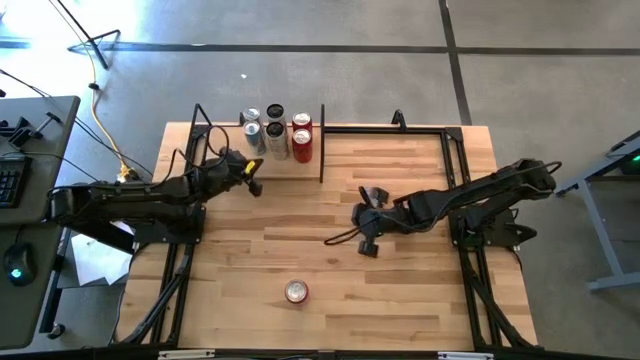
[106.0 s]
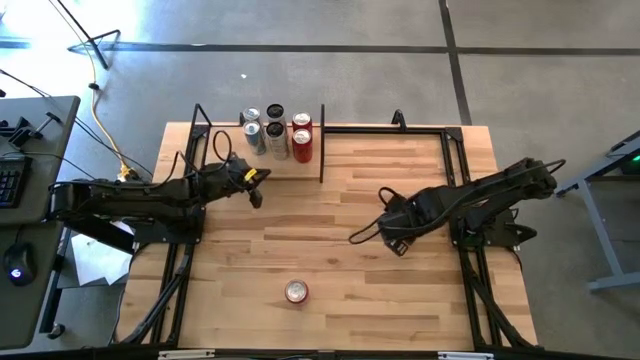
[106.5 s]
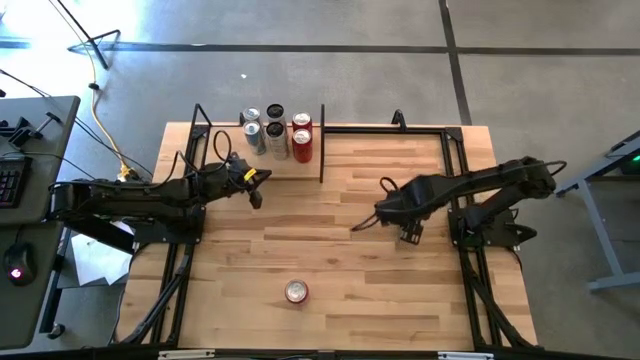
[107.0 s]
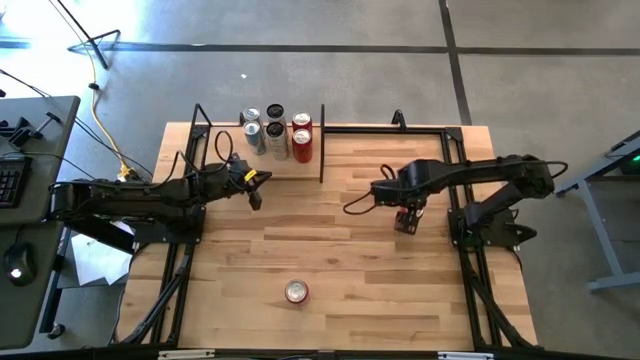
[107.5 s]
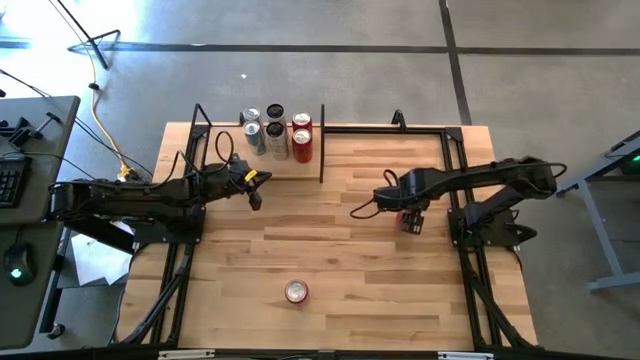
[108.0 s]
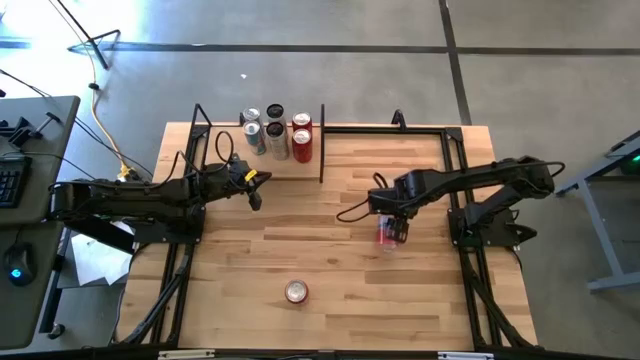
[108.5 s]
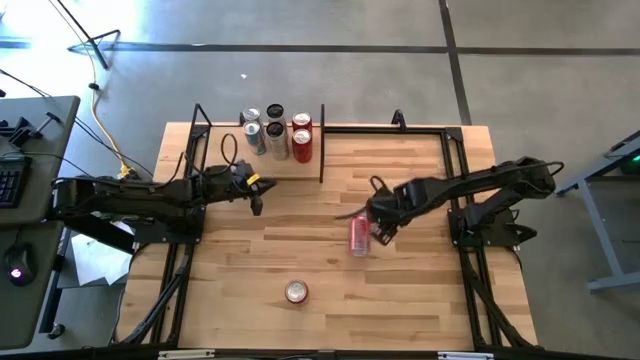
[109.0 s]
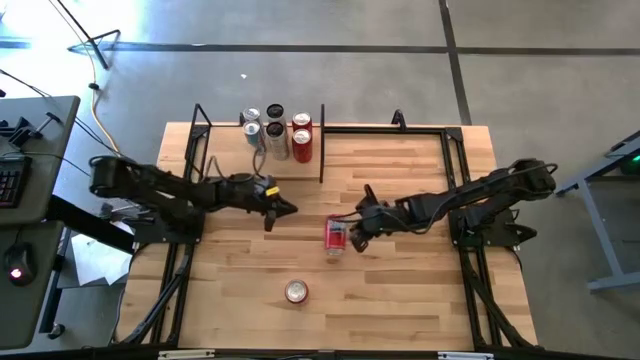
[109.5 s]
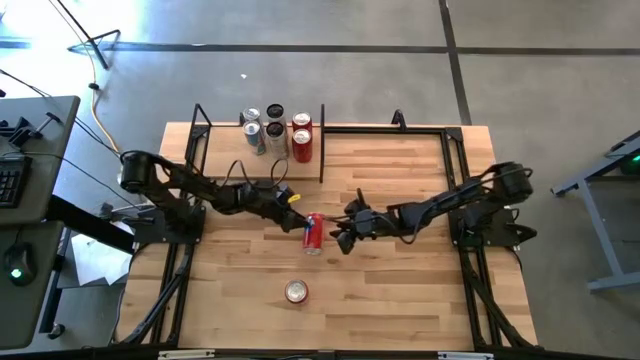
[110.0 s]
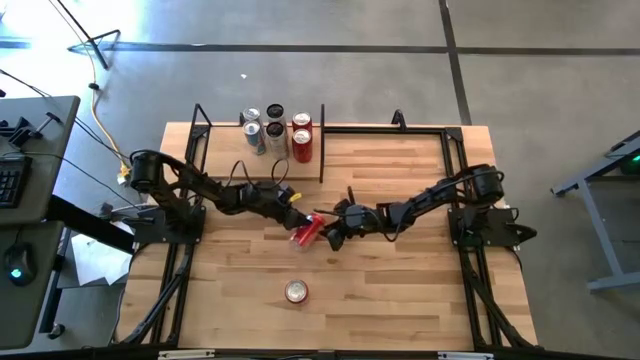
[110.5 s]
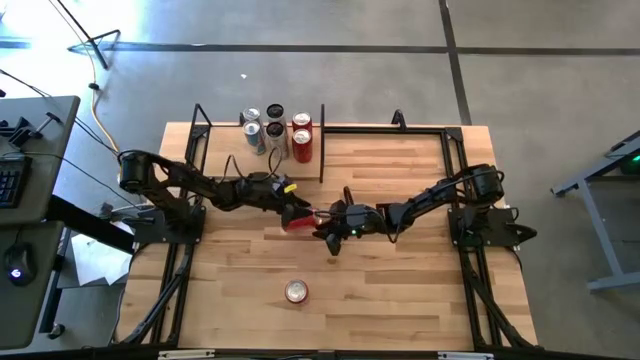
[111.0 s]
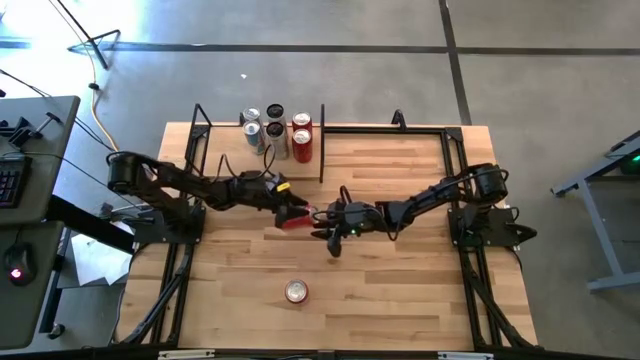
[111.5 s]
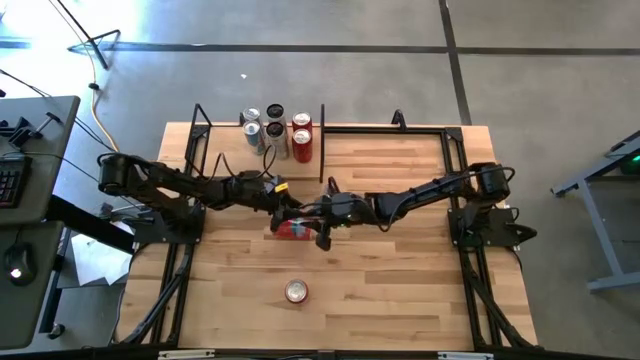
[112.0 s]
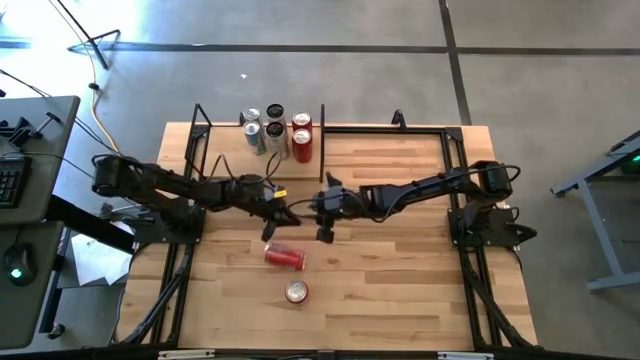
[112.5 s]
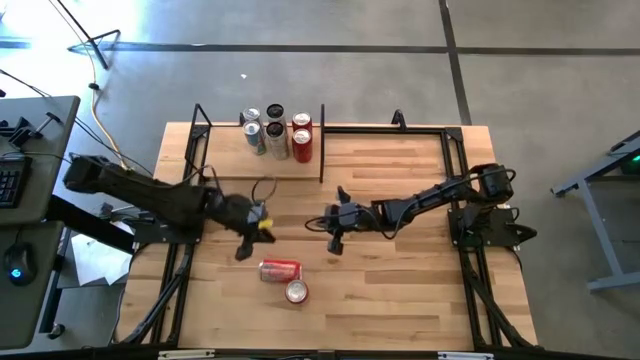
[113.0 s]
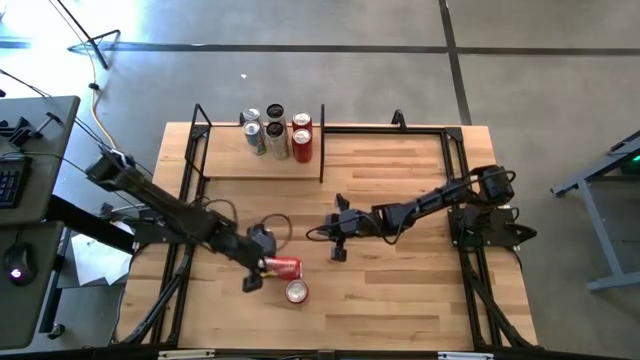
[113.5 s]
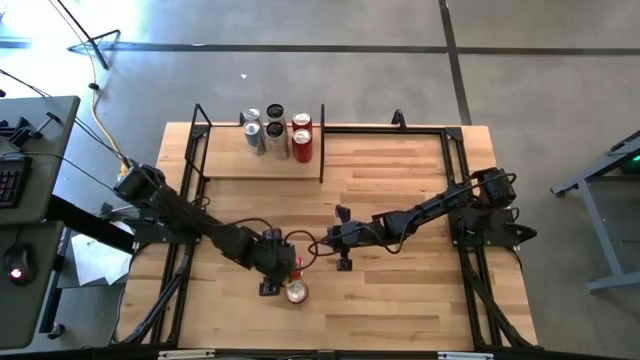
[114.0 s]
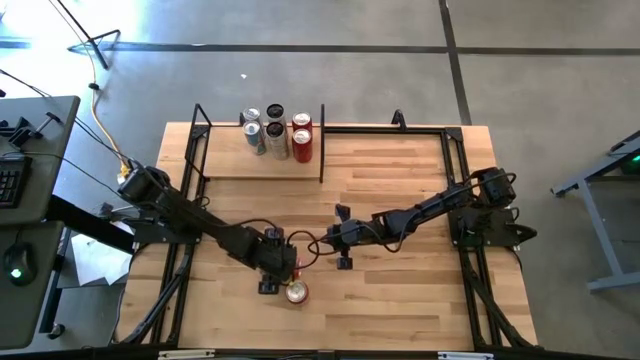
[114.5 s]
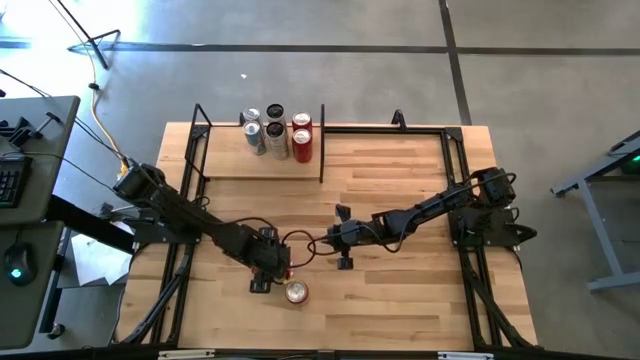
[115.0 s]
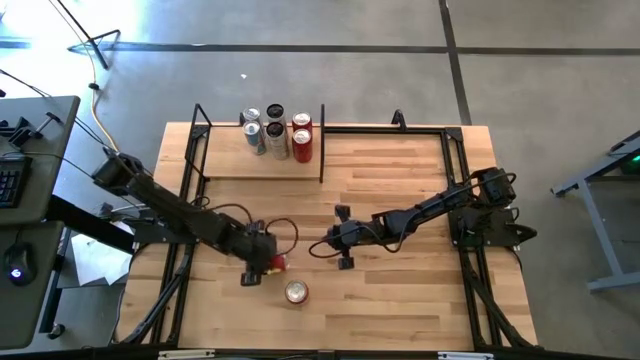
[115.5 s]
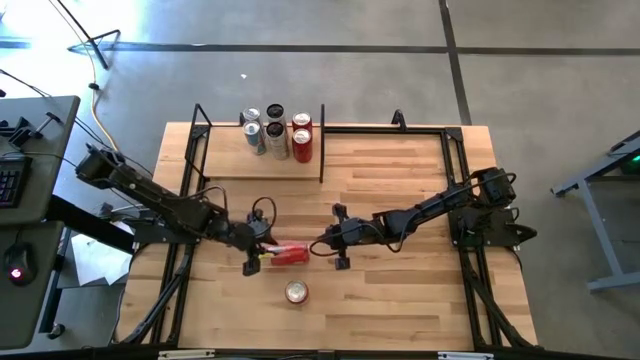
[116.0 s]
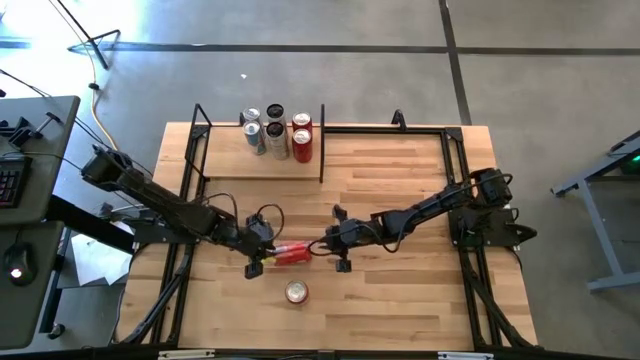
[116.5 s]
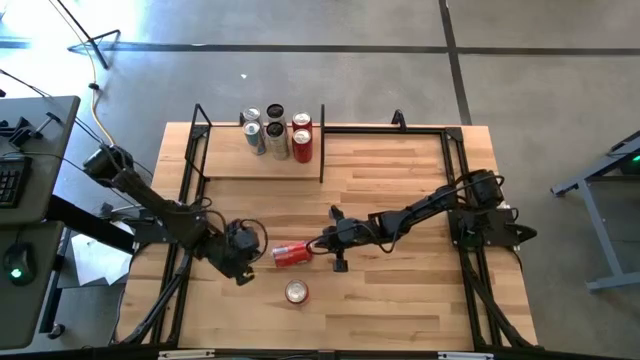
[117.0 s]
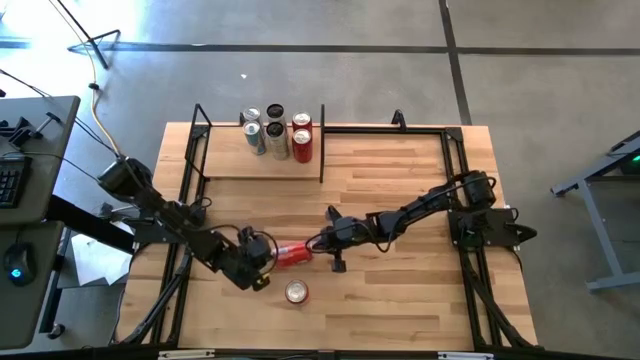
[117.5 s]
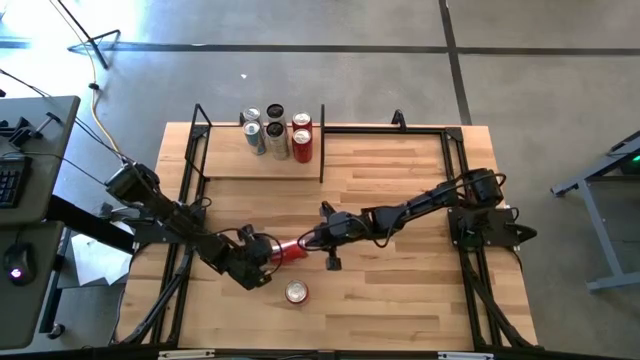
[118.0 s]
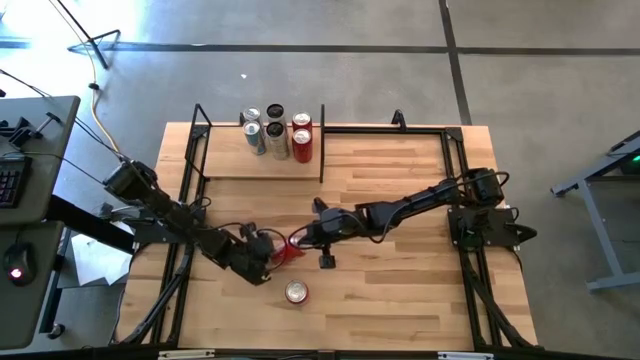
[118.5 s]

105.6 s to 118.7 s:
Task: Place canned beverage on shelf
Put the top red soda can on the shelf

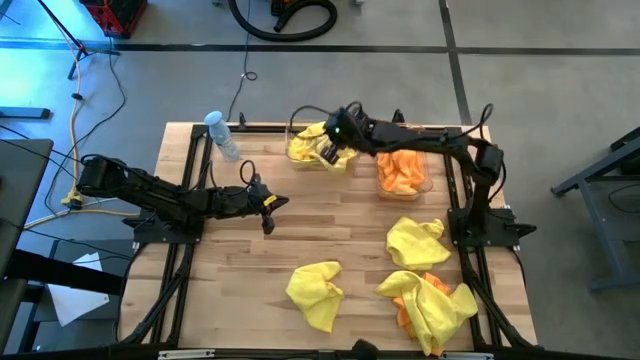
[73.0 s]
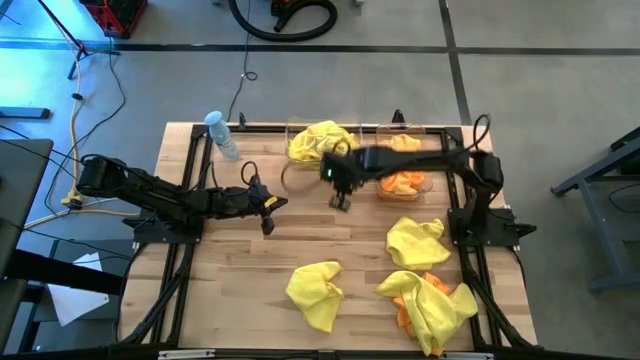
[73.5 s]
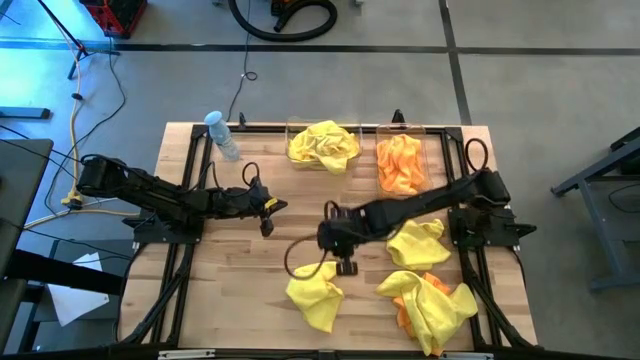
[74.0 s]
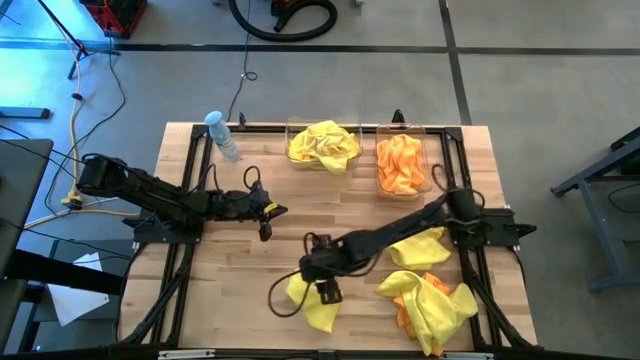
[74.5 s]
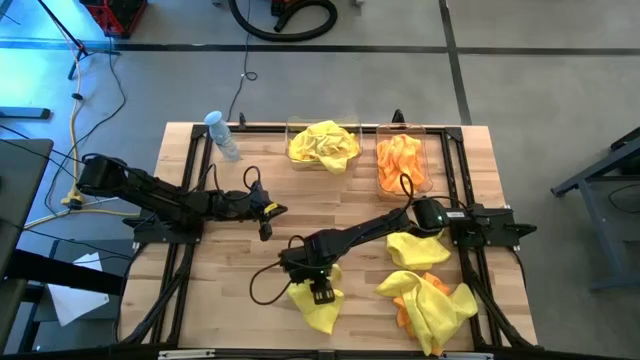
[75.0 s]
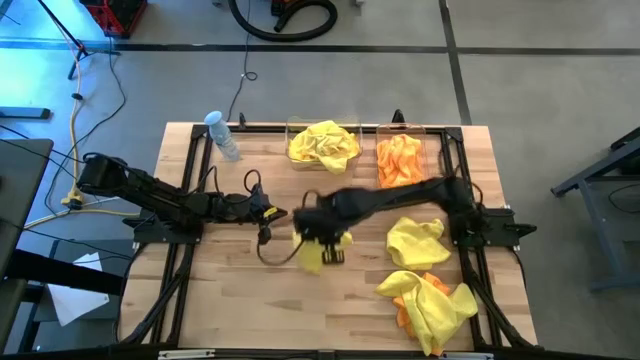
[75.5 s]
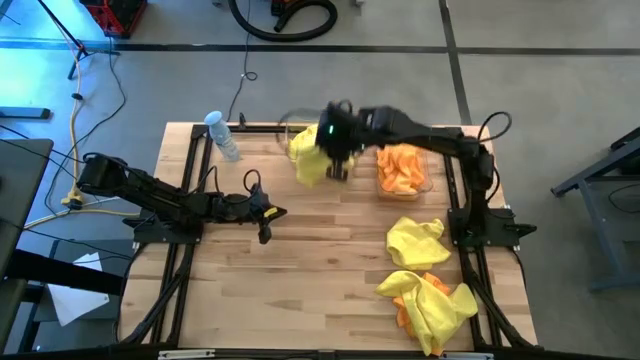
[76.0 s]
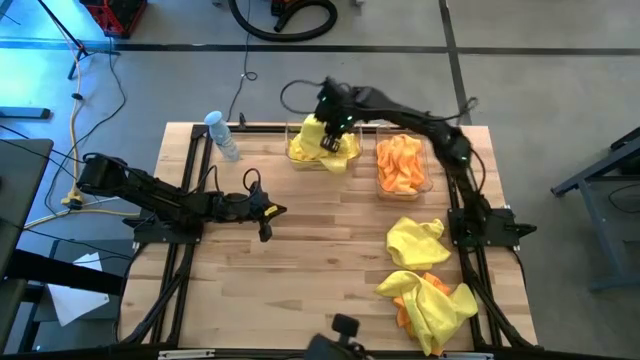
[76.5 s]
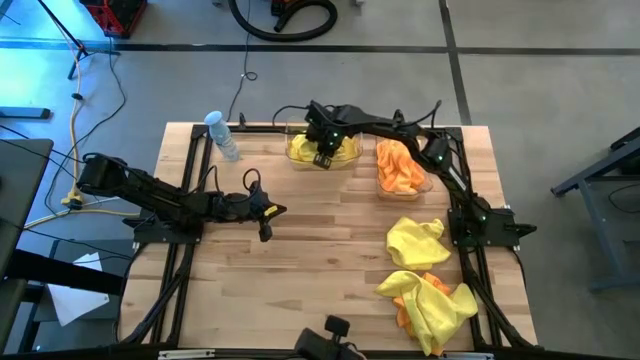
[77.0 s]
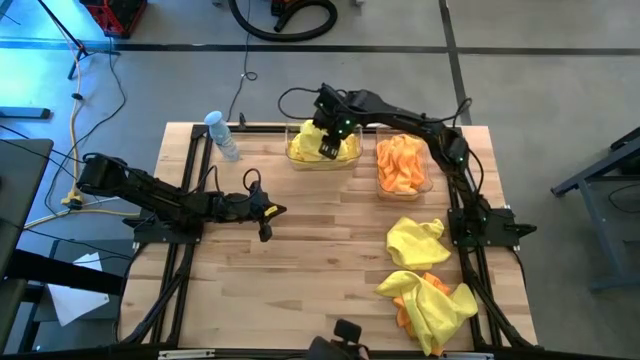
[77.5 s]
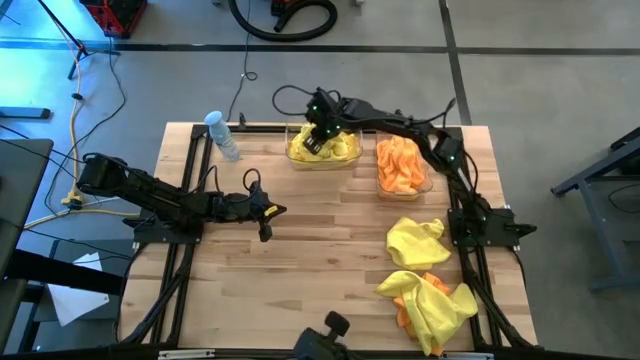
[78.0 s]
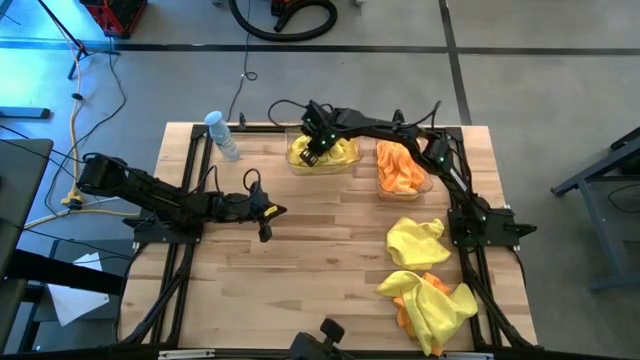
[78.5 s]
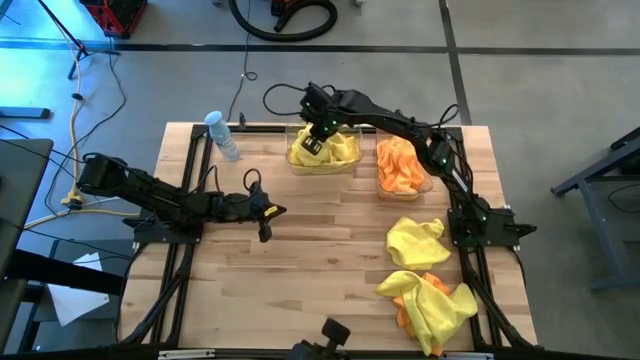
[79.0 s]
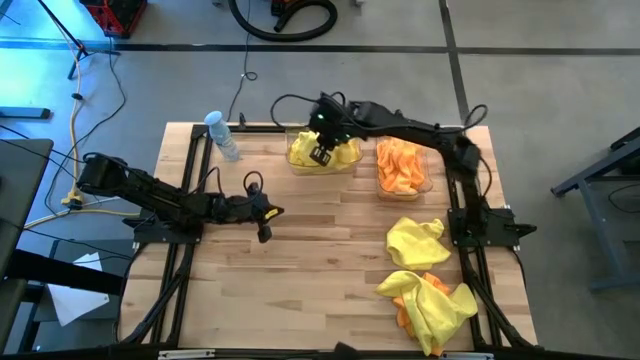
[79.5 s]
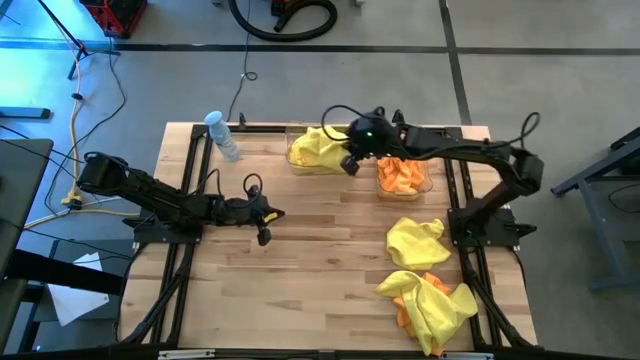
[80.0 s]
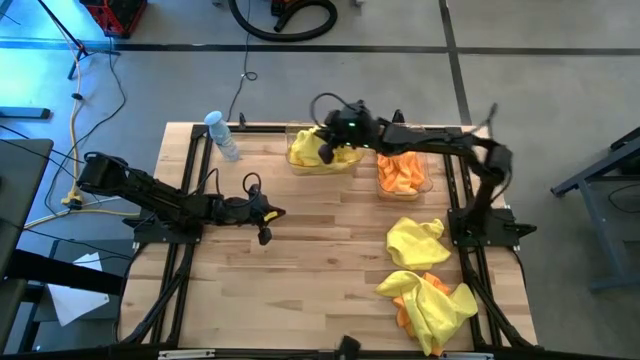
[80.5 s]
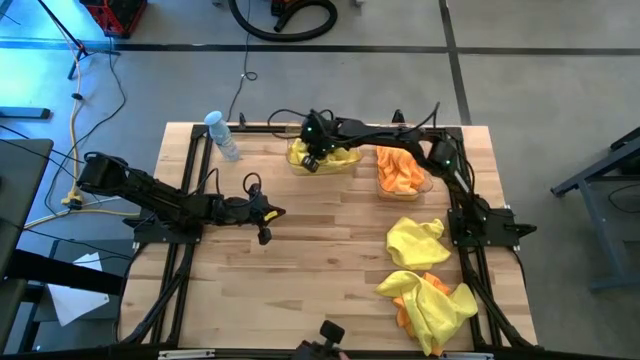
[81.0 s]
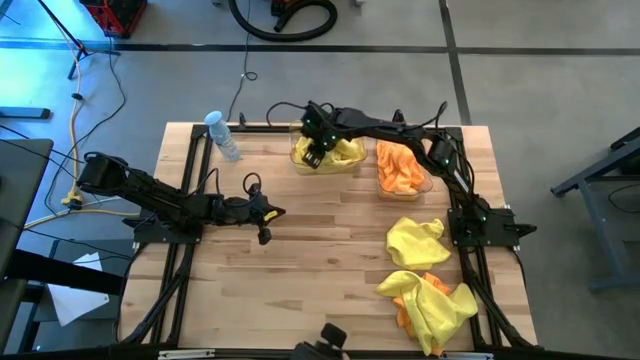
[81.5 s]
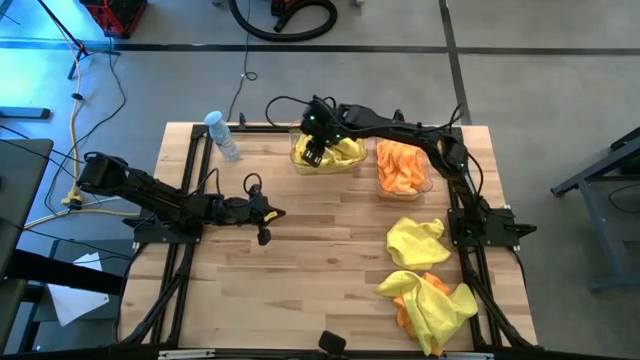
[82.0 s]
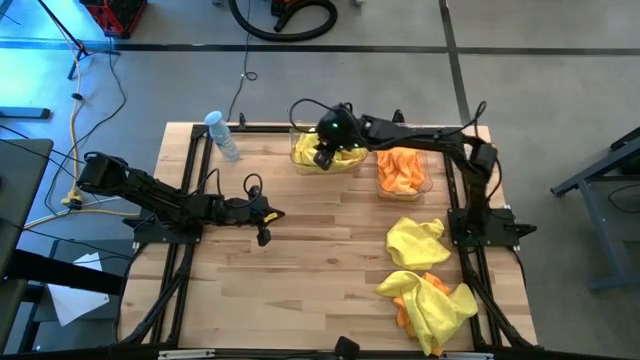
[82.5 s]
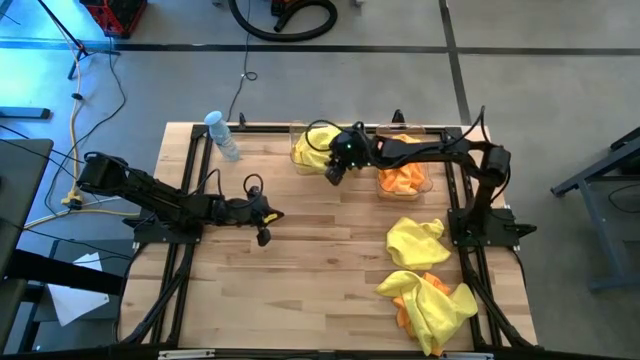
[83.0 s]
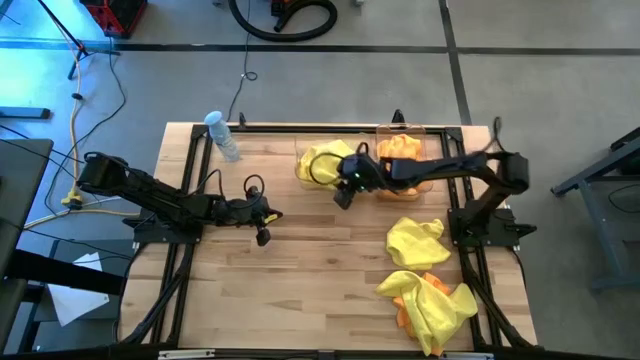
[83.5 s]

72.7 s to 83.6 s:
Task: Sort microfiber towel by color & place in baskets
Put the yellow microfiber towel into the left transparent bin
